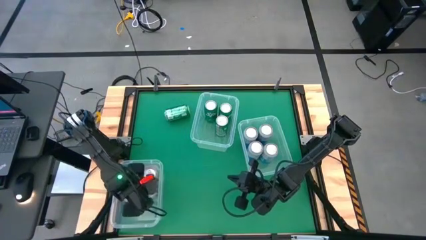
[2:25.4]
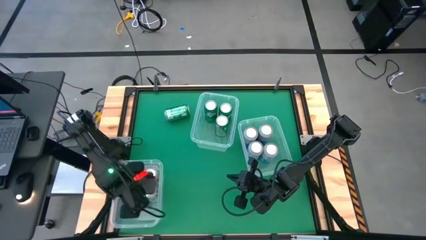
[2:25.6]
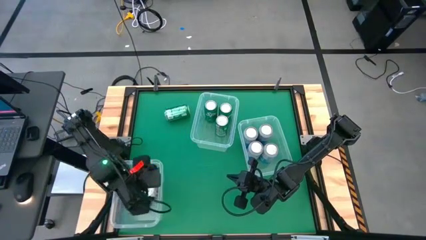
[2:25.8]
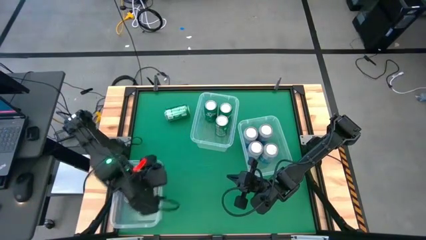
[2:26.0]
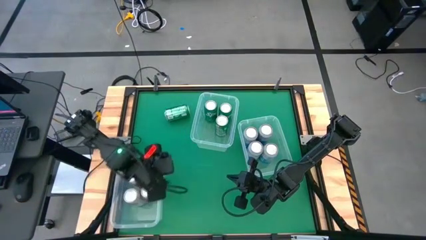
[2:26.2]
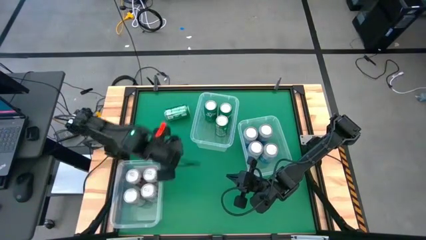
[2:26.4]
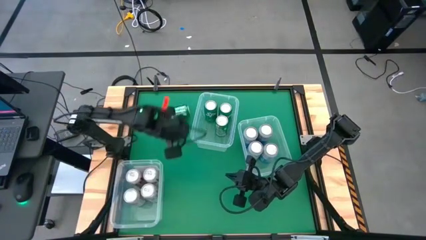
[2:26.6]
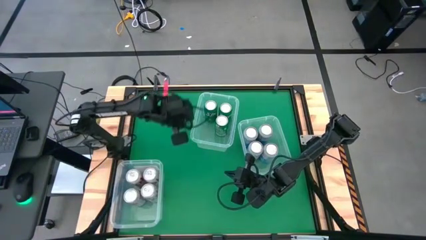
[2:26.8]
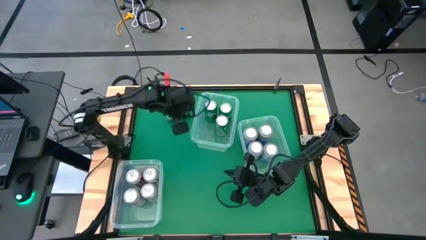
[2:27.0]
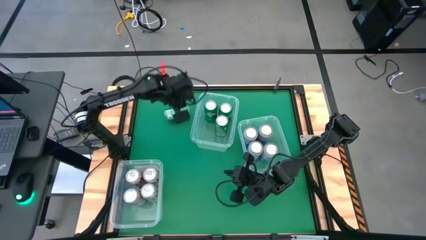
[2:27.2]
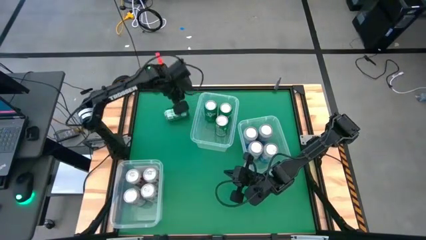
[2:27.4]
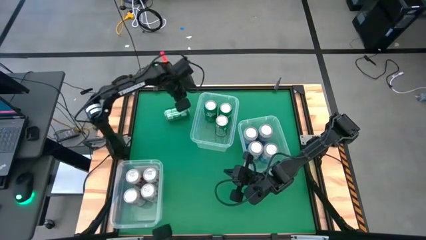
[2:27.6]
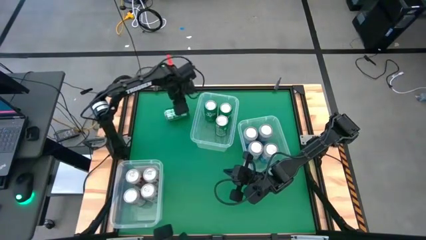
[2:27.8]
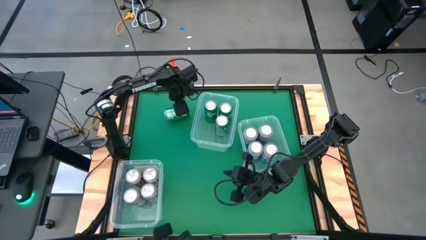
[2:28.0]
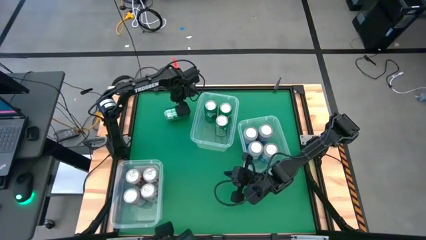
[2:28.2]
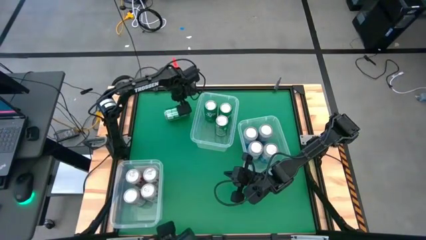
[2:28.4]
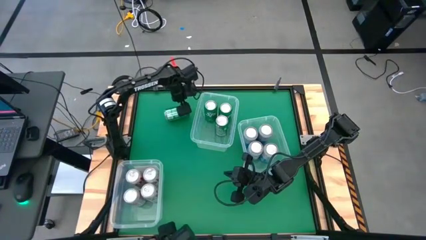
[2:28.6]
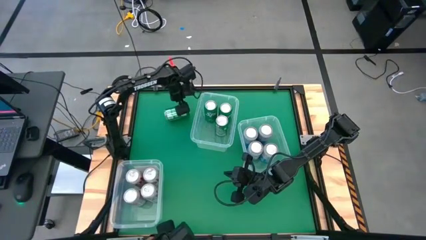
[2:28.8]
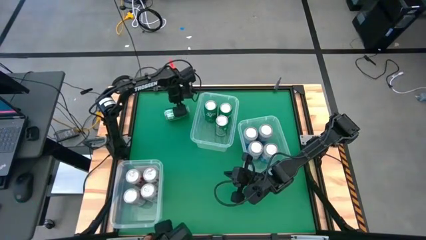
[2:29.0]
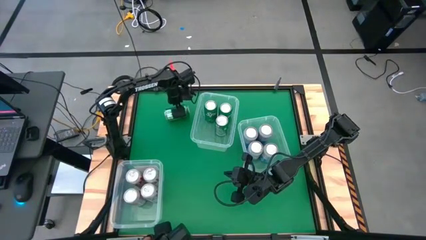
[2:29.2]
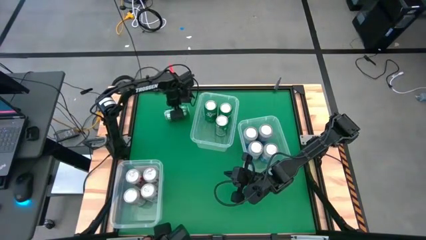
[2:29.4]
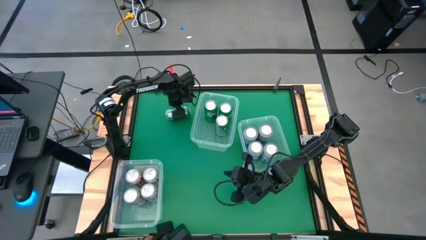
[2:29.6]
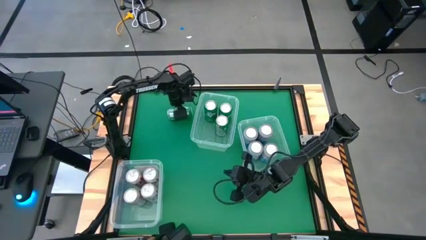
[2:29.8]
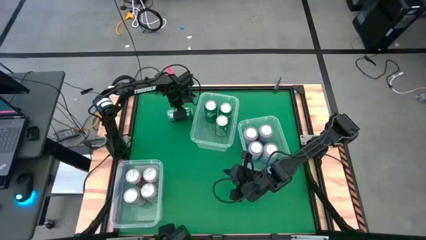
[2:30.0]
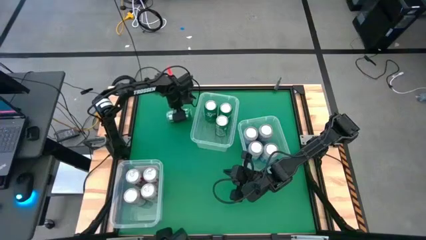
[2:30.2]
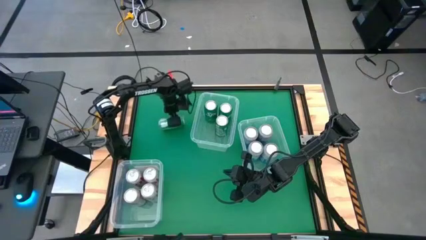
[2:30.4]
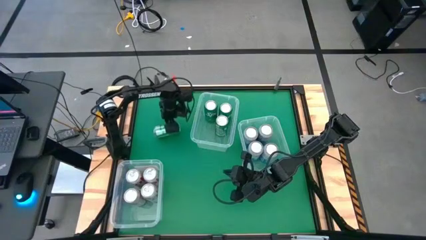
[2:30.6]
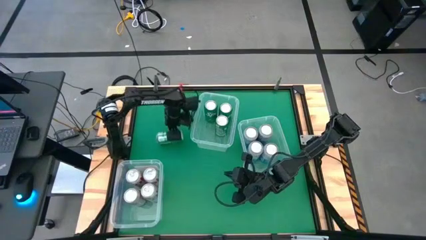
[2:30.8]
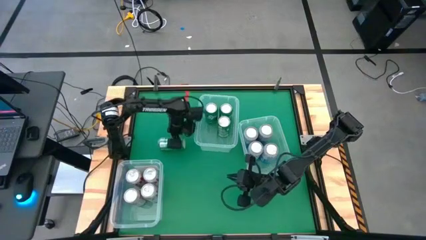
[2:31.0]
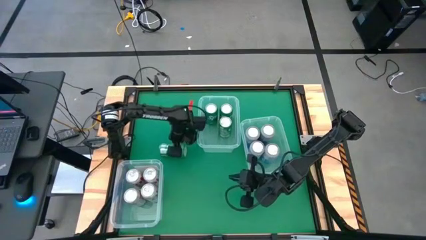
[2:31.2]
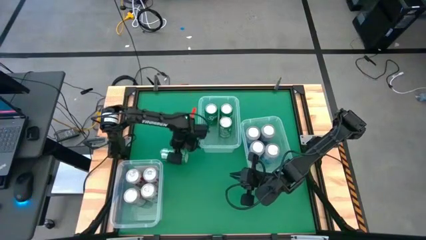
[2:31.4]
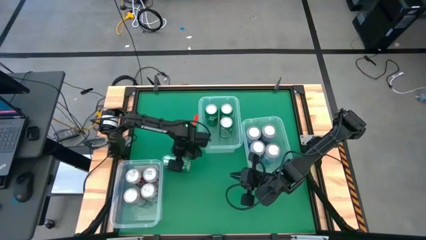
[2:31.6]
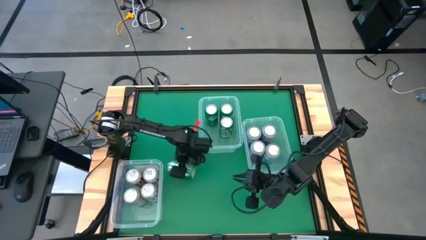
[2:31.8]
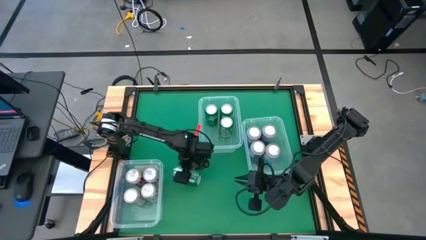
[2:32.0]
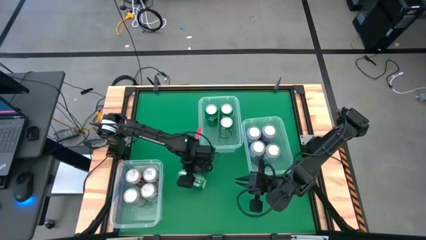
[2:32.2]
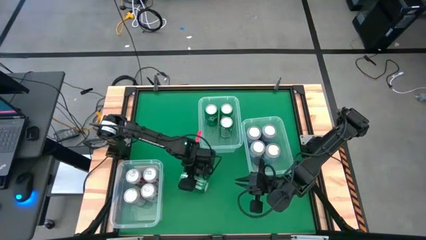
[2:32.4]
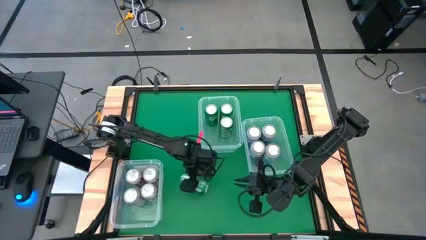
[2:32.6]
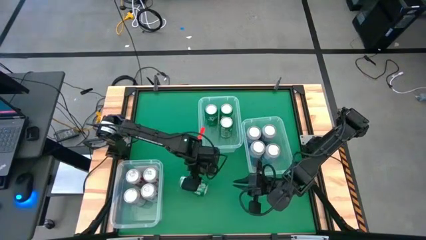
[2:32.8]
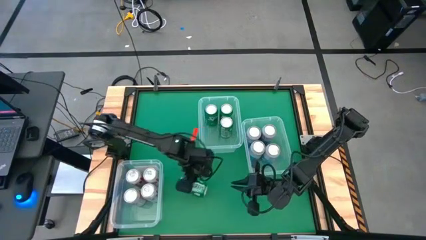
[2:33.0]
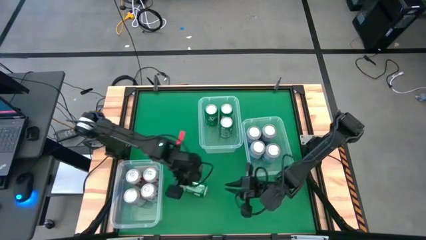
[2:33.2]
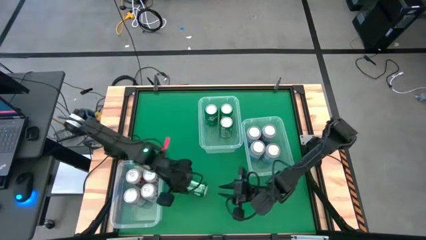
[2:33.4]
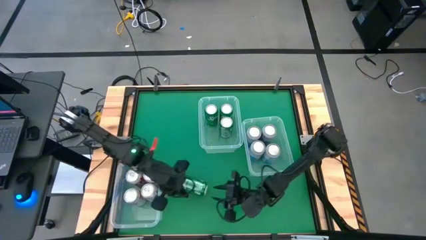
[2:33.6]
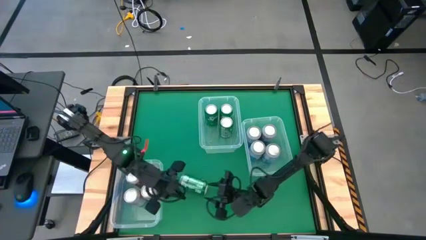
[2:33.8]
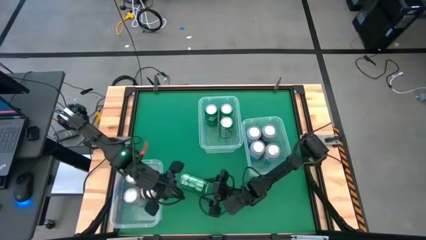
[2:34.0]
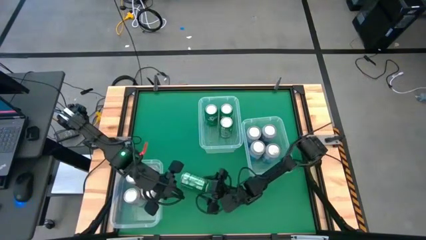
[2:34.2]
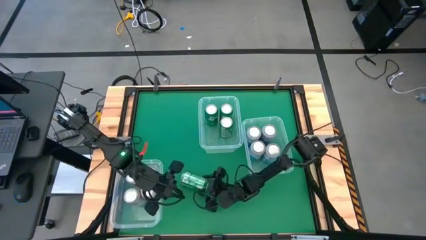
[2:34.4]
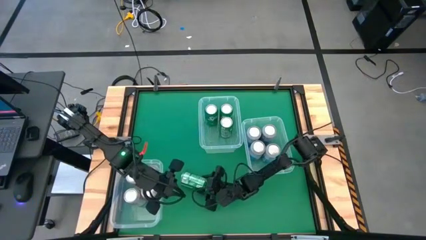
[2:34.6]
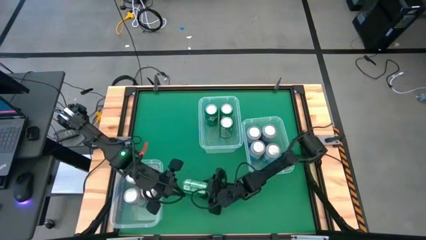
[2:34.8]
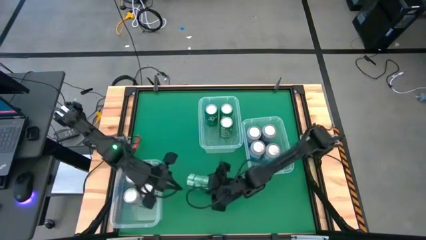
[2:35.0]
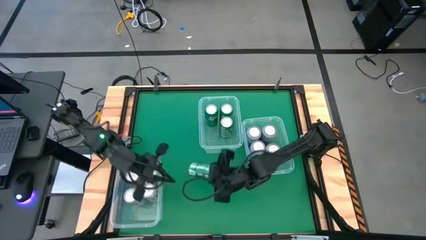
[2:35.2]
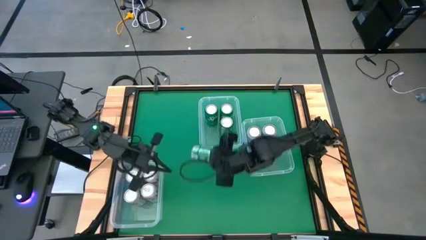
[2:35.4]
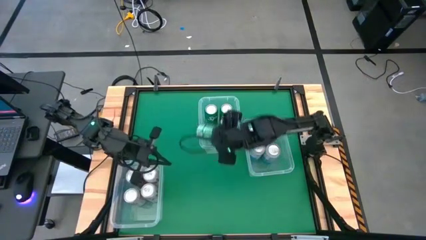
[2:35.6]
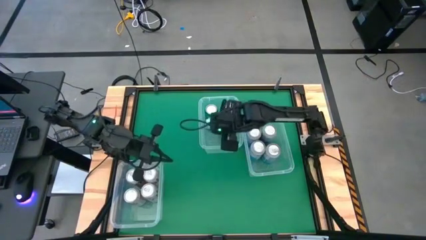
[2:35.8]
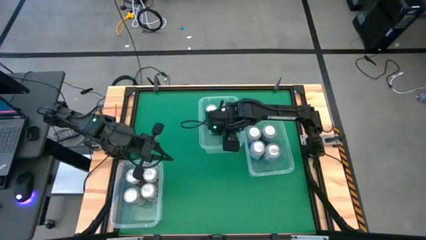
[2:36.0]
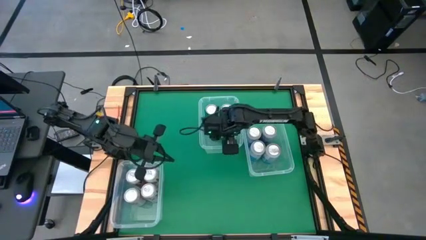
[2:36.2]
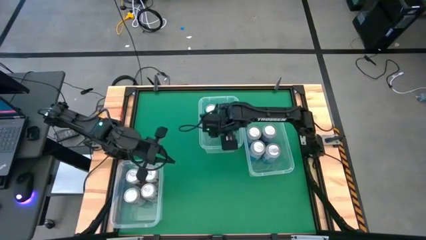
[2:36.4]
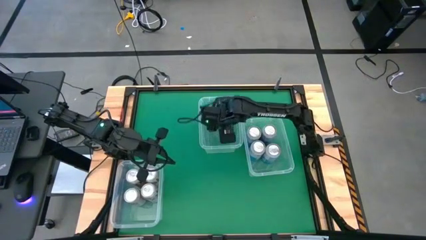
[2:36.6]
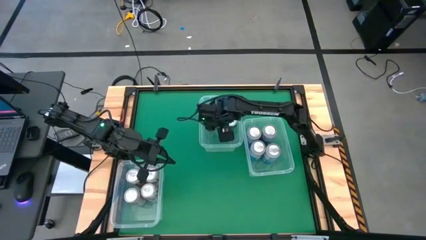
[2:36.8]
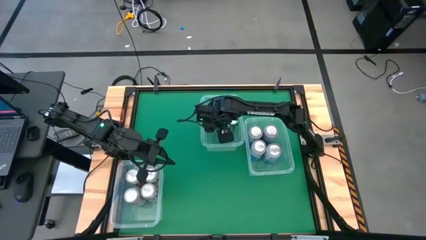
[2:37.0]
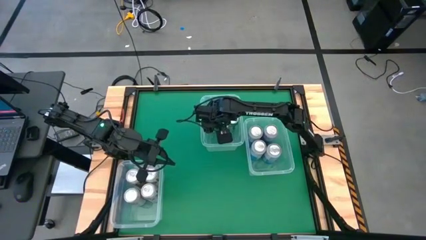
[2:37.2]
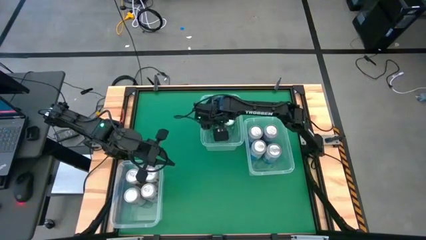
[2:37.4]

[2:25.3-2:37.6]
Task: Sort soda cans
Put the green soda can into the top transparent bin

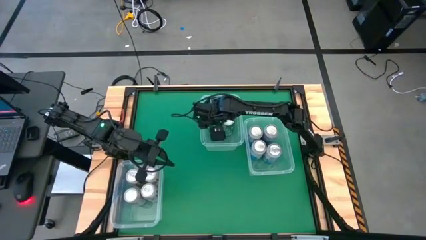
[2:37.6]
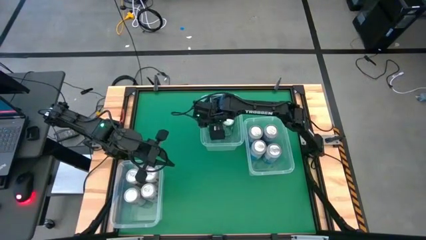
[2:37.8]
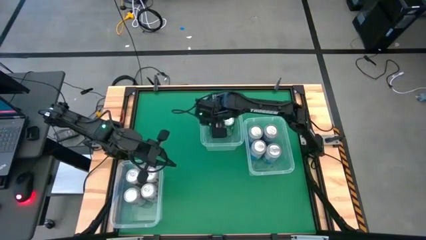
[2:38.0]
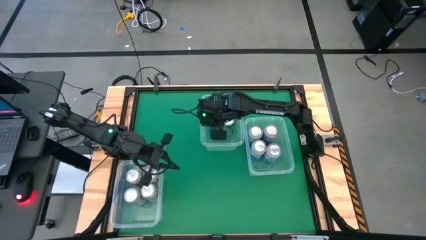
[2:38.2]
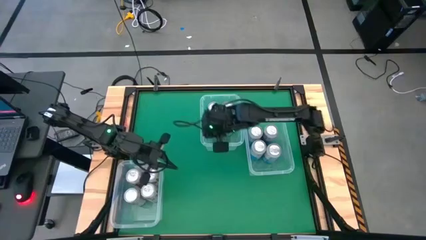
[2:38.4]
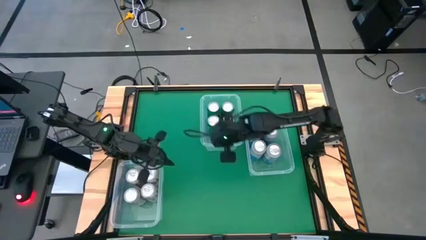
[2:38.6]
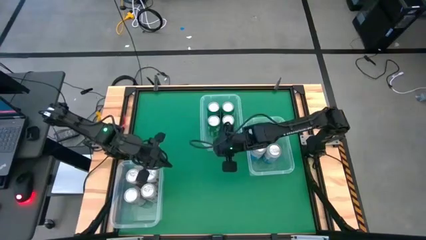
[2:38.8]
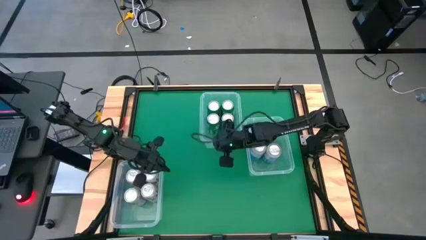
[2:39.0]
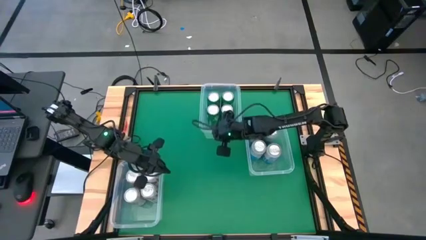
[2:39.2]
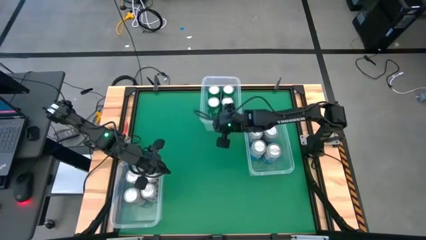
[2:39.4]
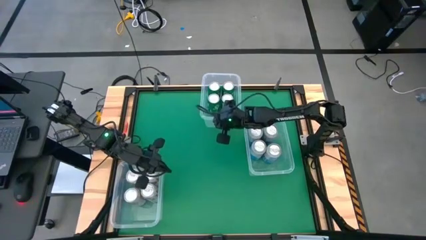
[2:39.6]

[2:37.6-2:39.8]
Move the top left transparent bin to the top center of the table

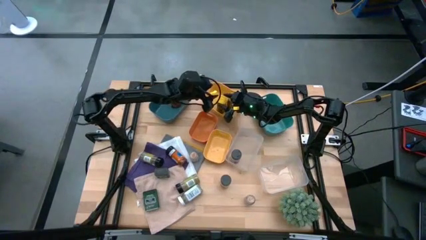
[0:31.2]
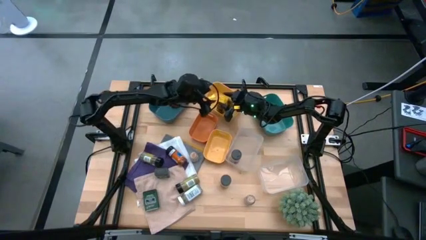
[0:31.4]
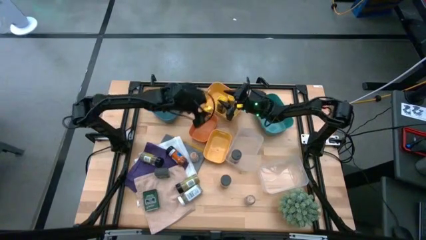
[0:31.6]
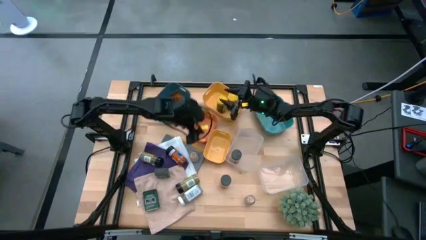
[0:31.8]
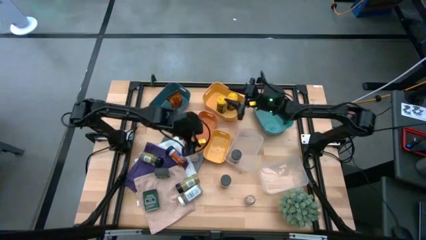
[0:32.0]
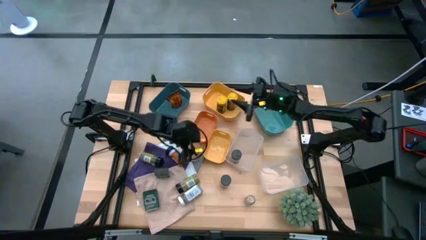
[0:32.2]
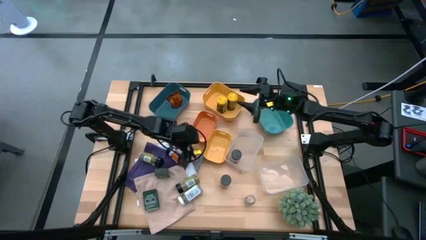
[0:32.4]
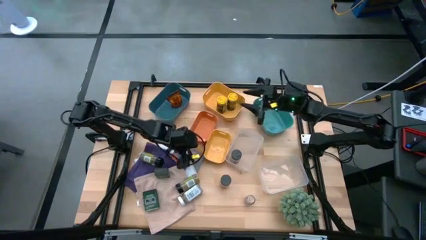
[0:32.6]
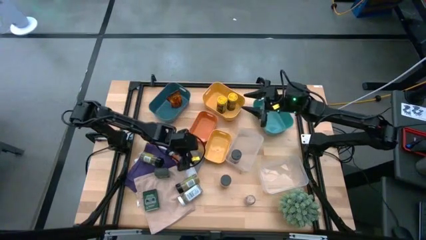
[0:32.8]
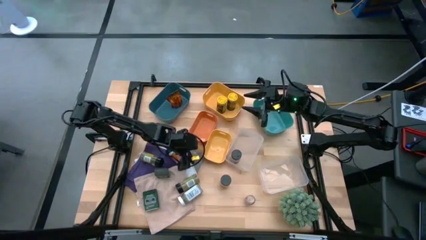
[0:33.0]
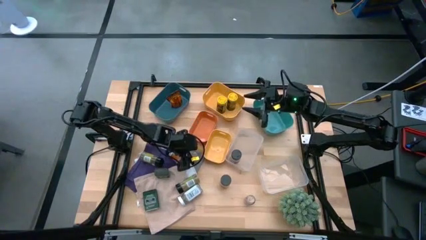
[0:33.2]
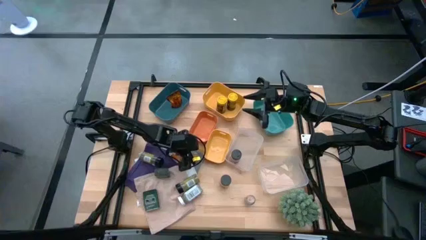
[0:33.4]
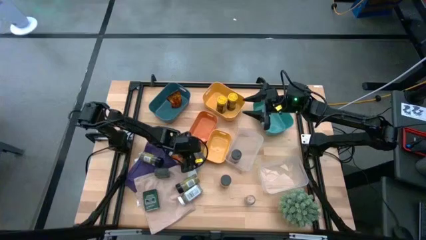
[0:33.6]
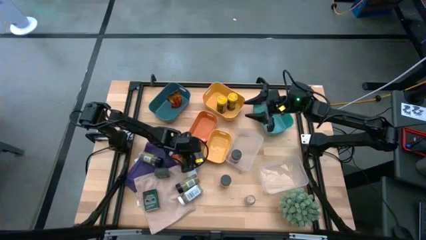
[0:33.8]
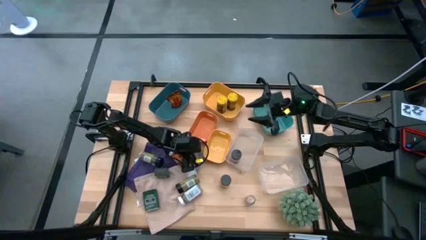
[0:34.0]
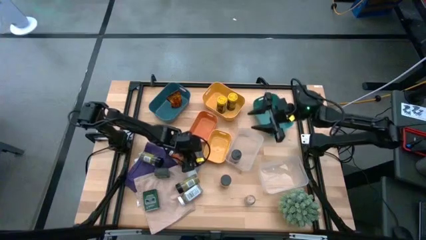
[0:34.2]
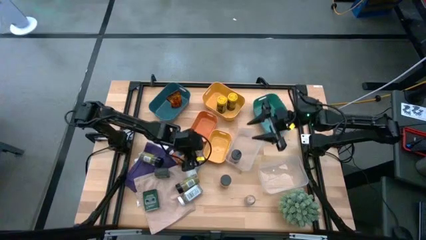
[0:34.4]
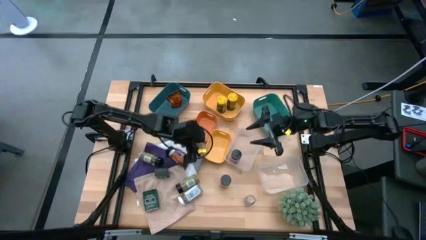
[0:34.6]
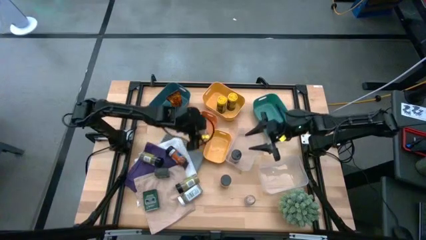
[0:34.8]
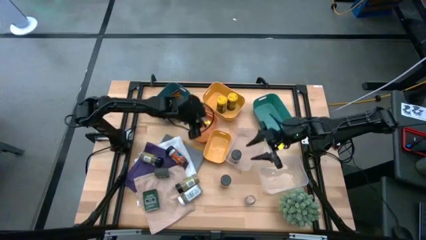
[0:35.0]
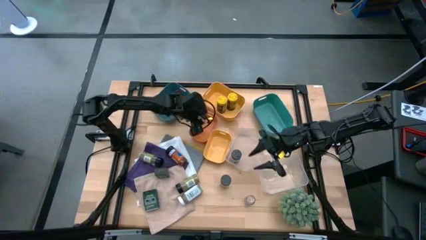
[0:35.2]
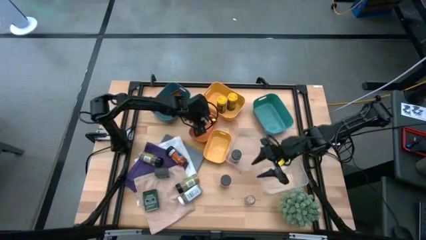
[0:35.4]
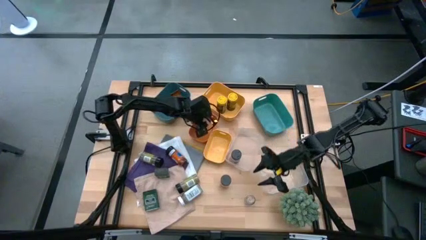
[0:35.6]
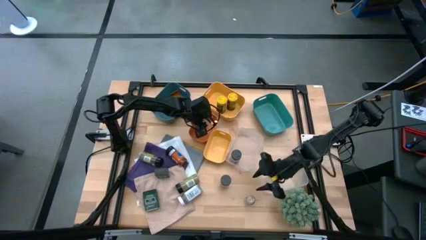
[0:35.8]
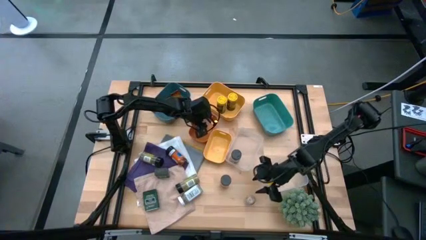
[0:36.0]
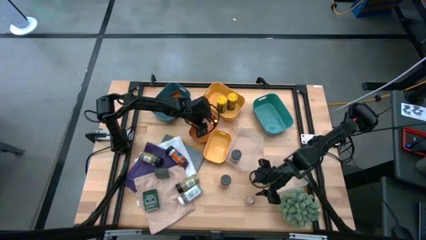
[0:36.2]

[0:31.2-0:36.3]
Task: Sort spices by type
Put the brown seasoning bottle into the orange bin
